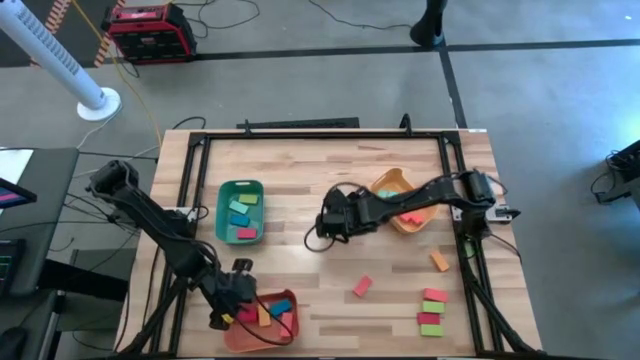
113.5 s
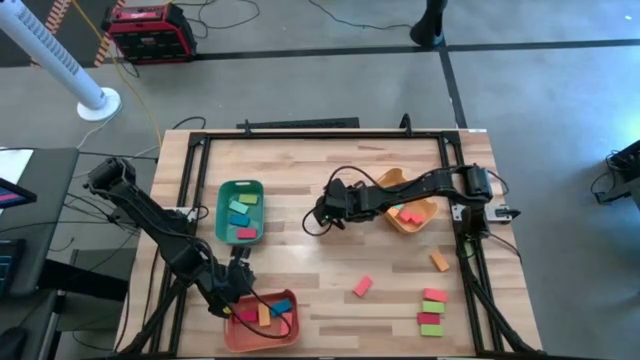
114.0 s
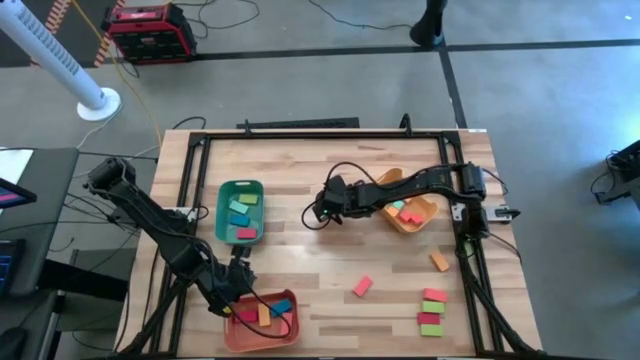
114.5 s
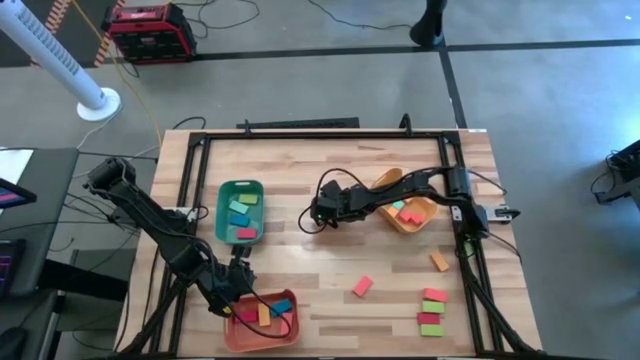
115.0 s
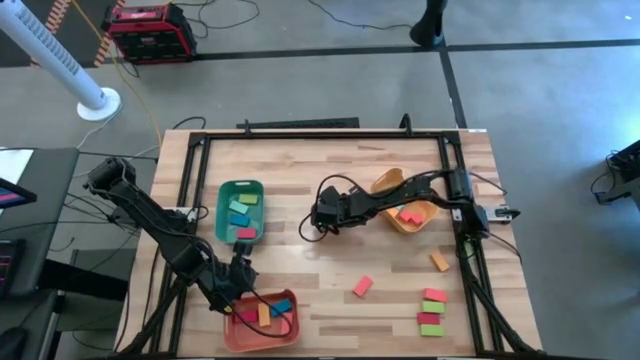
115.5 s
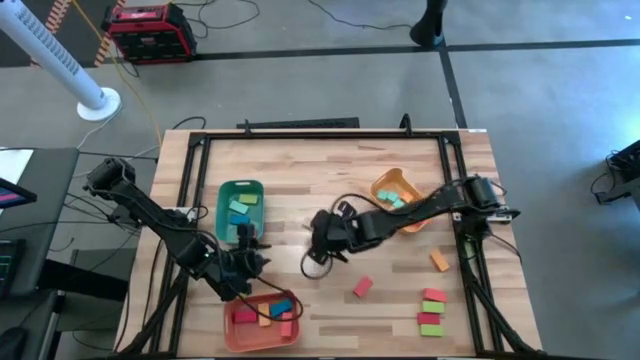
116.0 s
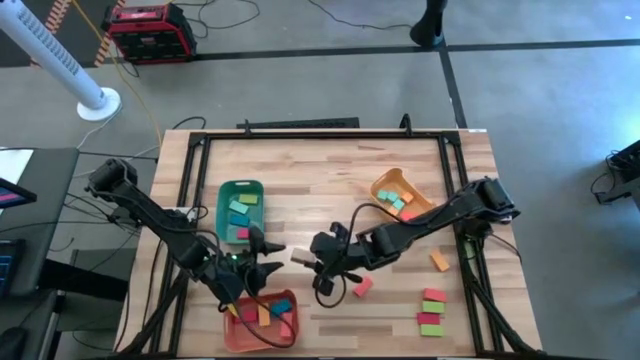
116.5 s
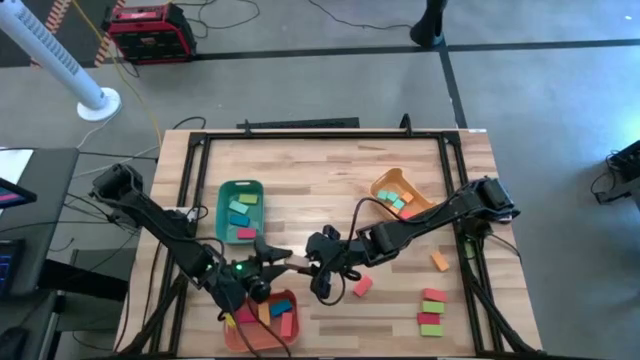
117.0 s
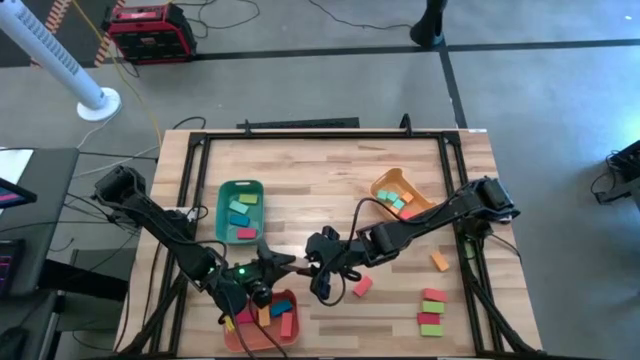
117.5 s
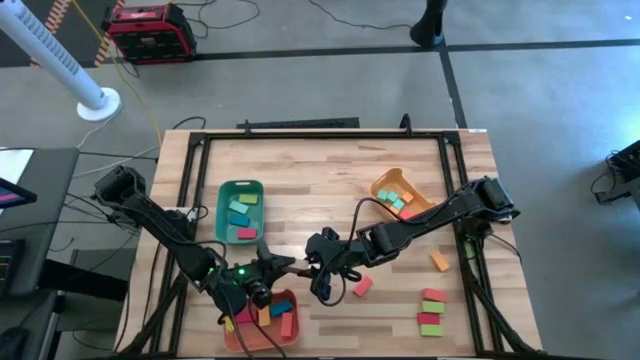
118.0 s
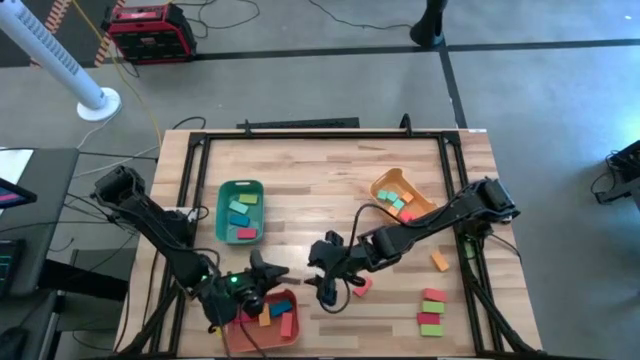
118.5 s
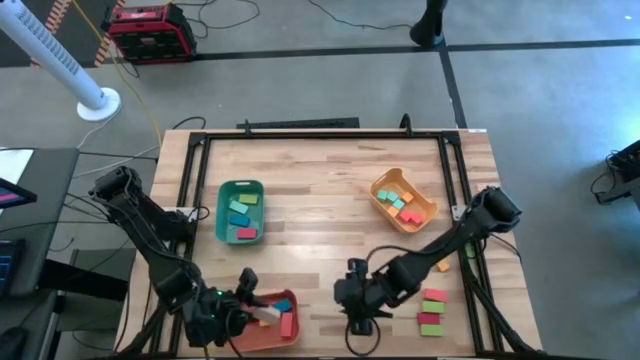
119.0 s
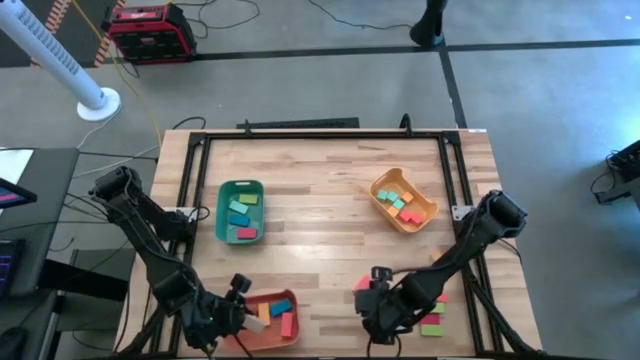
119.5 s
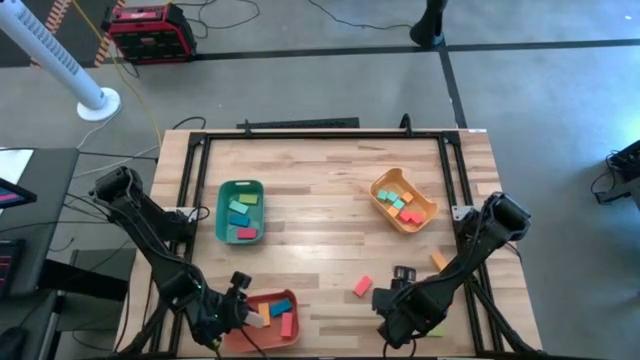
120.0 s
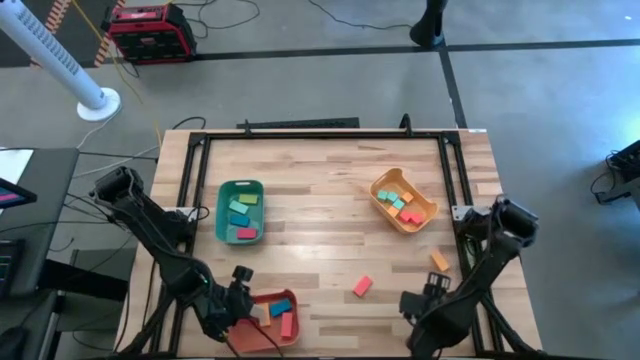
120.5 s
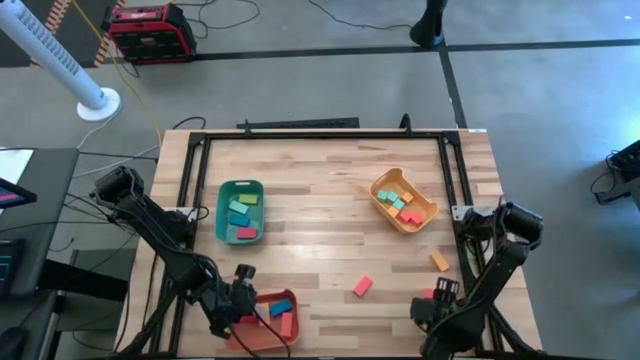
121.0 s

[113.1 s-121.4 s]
Task: Sort blocks by size
Put the thick brown rectangular block into the orange bin

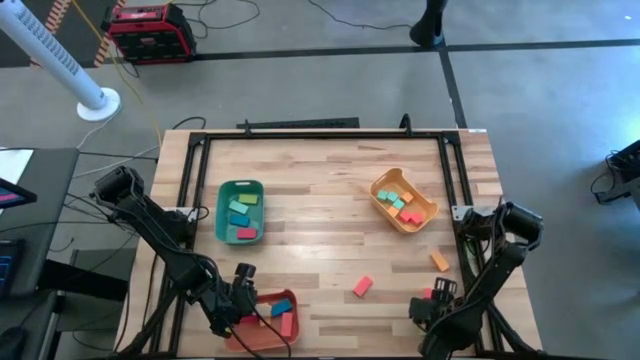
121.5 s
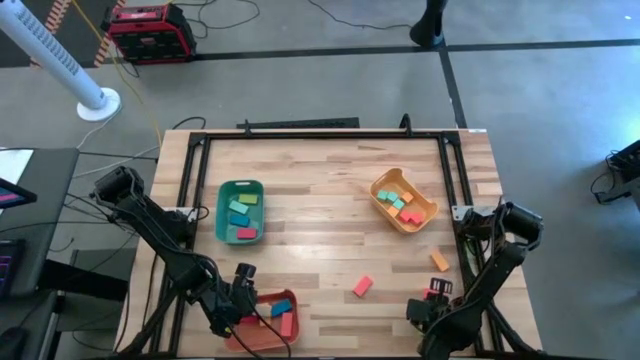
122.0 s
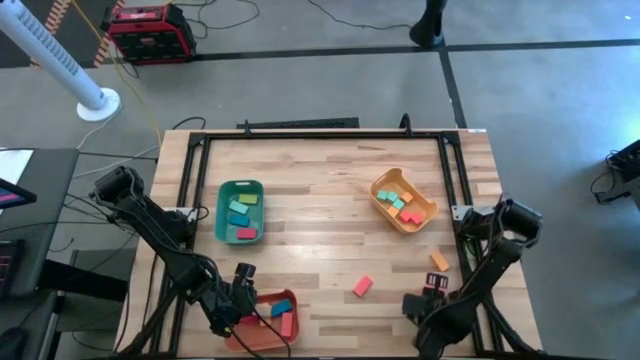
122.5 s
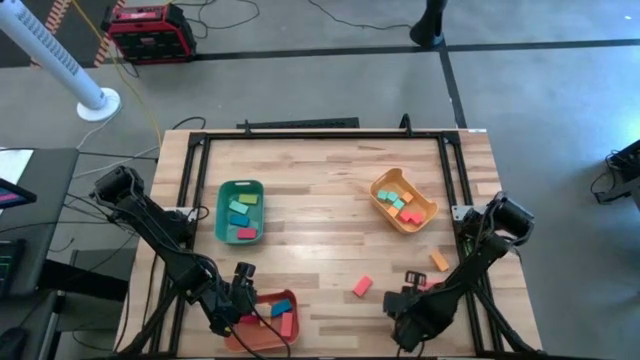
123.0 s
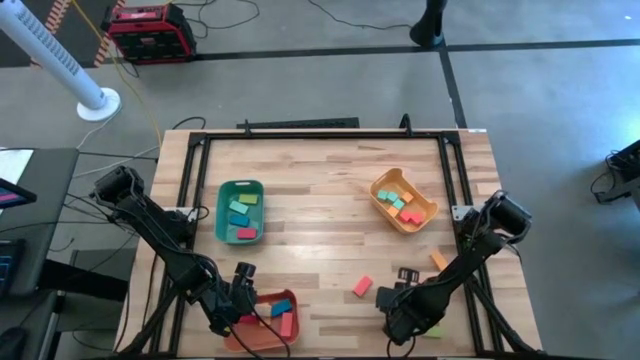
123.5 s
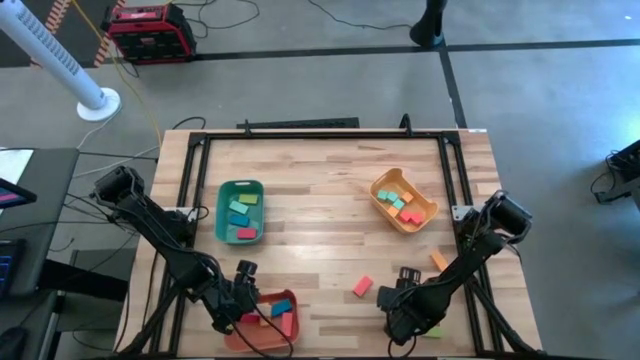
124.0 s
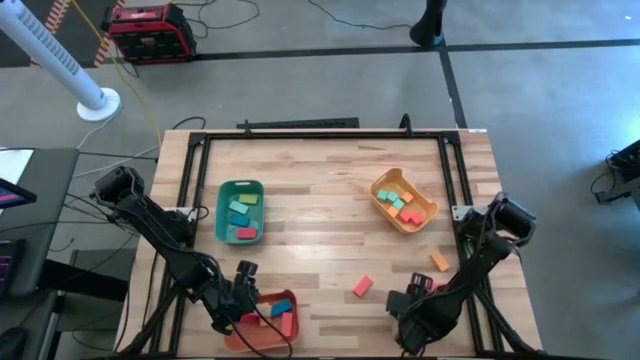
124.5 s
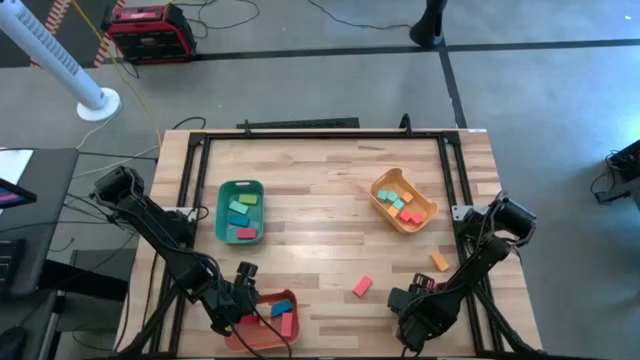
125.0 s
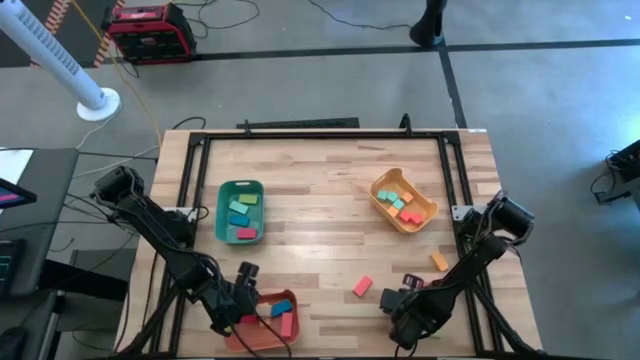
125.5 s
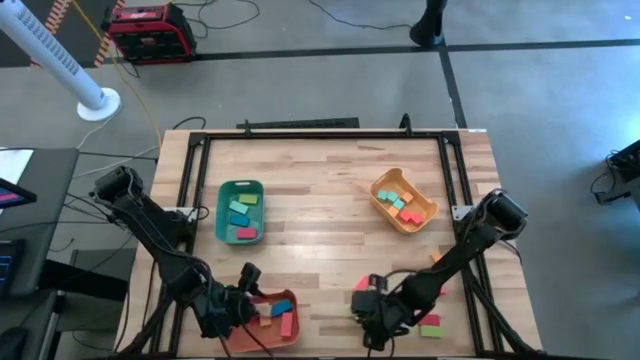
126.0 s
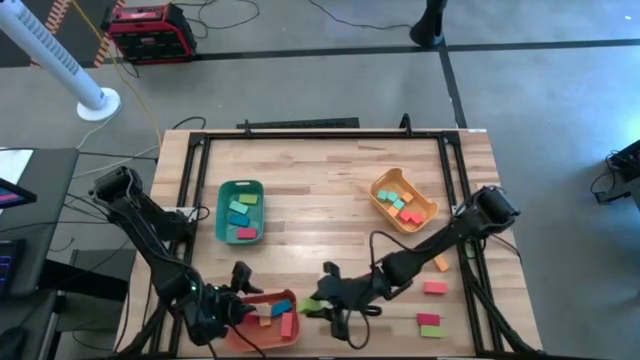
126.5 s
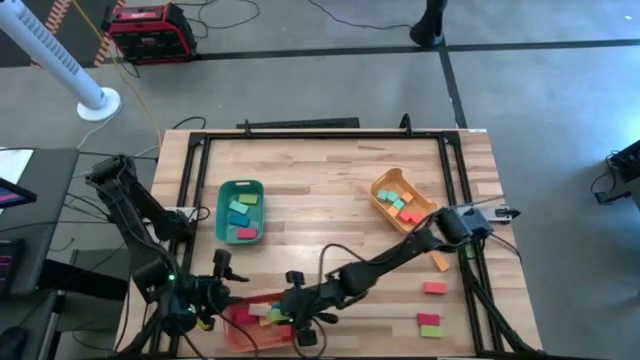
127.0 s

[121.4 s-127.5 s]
Put the thick light green rectangular block into the orange bin

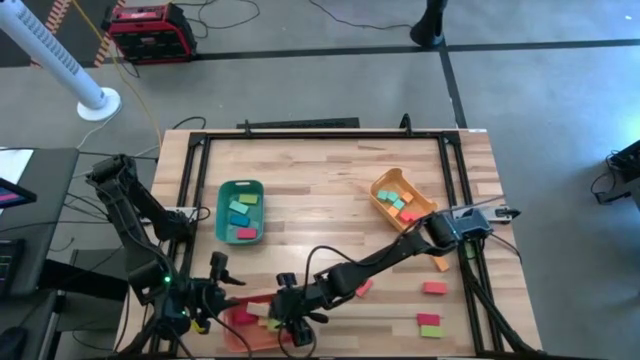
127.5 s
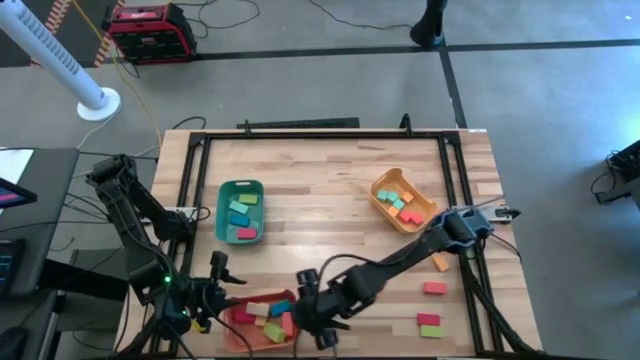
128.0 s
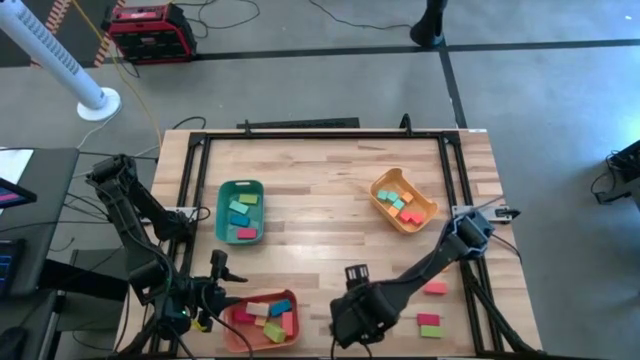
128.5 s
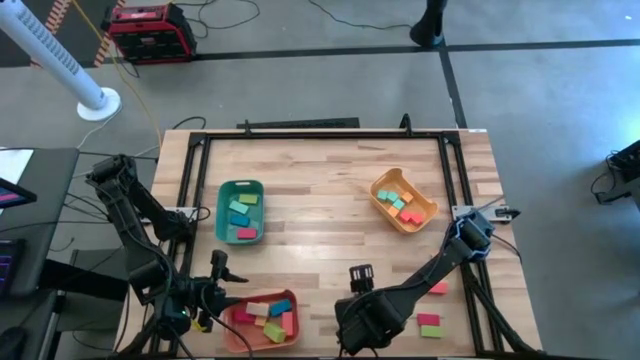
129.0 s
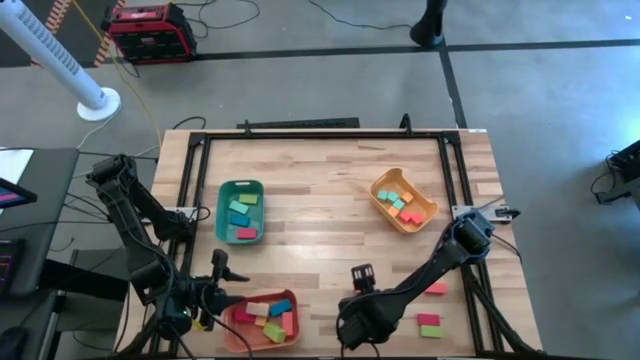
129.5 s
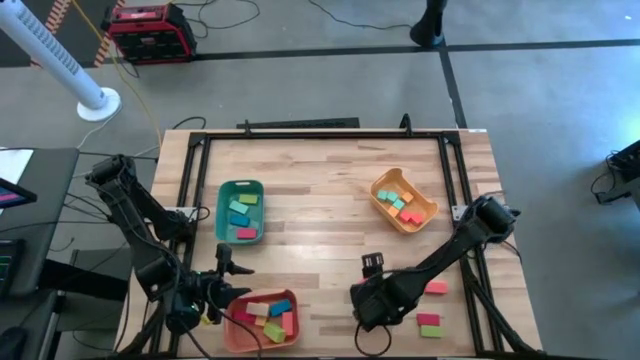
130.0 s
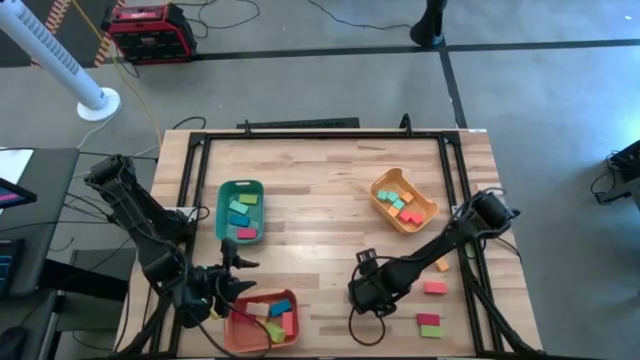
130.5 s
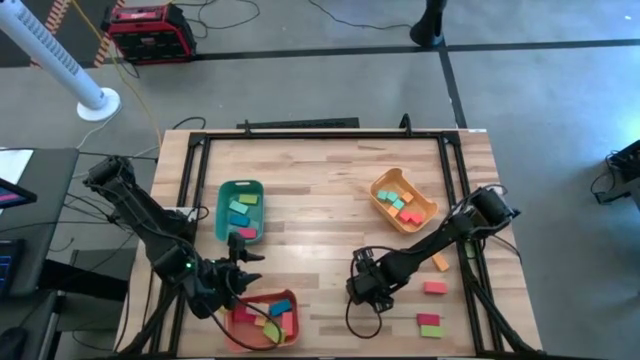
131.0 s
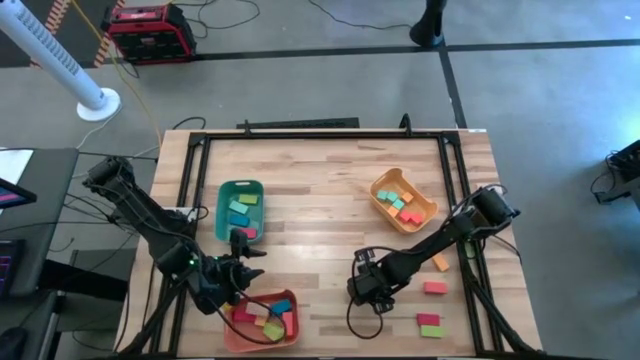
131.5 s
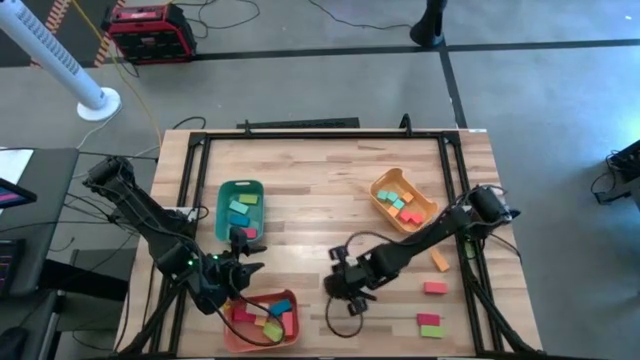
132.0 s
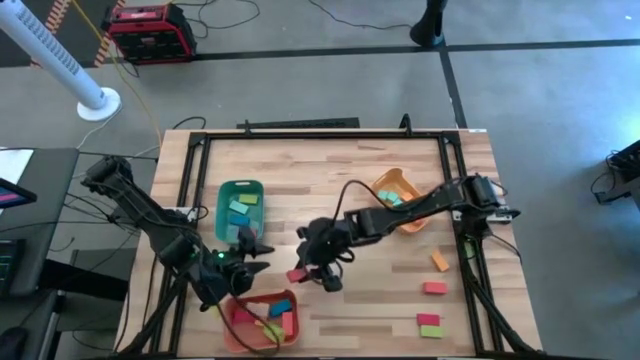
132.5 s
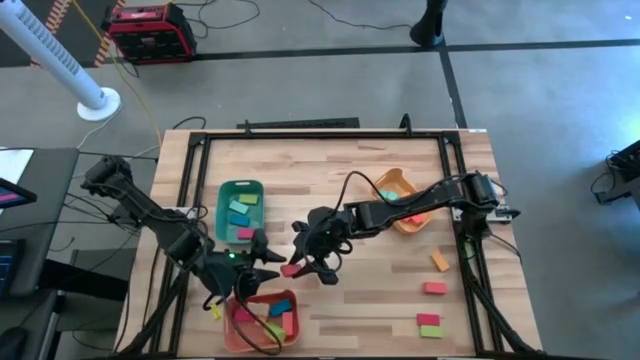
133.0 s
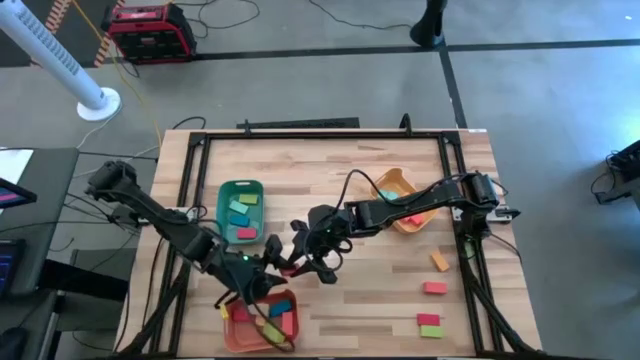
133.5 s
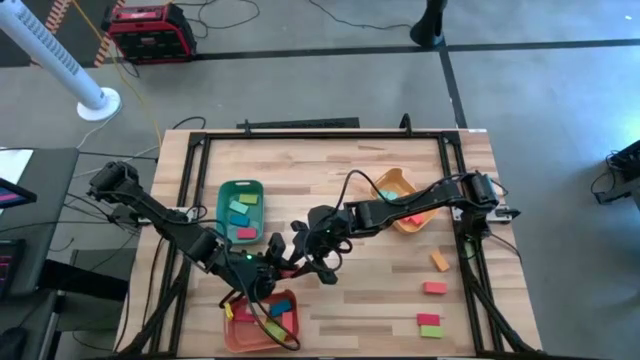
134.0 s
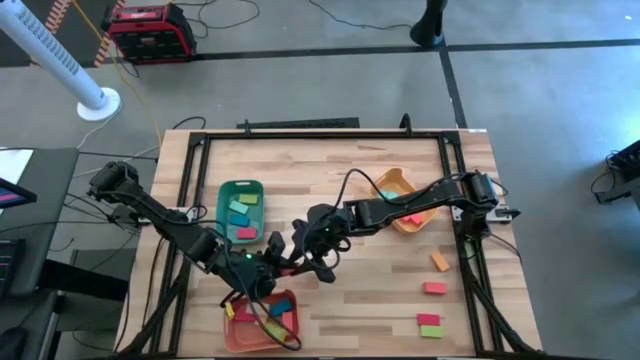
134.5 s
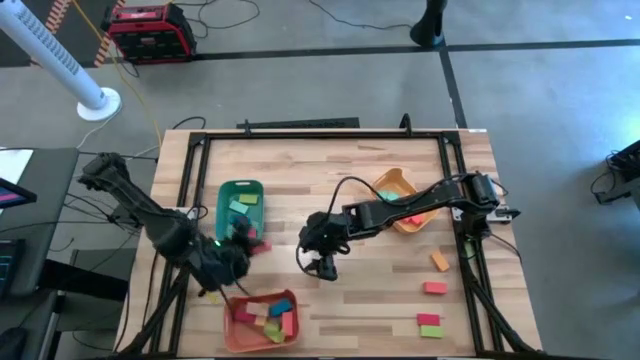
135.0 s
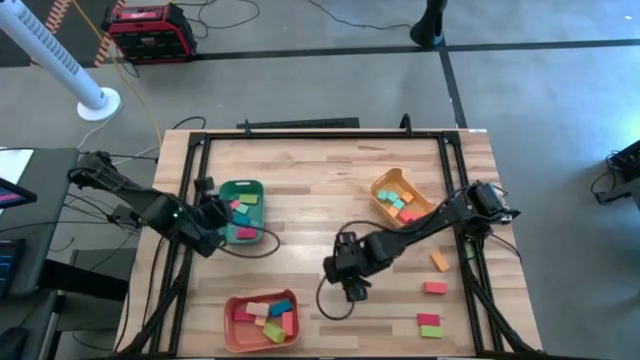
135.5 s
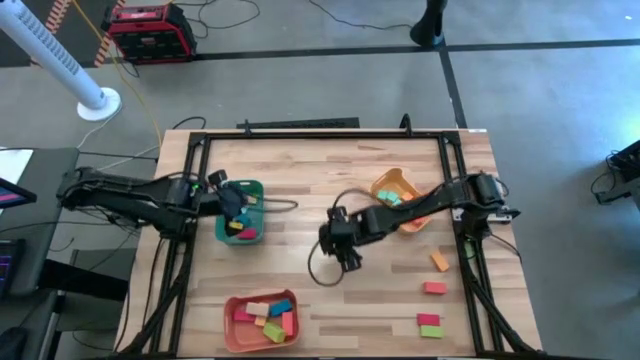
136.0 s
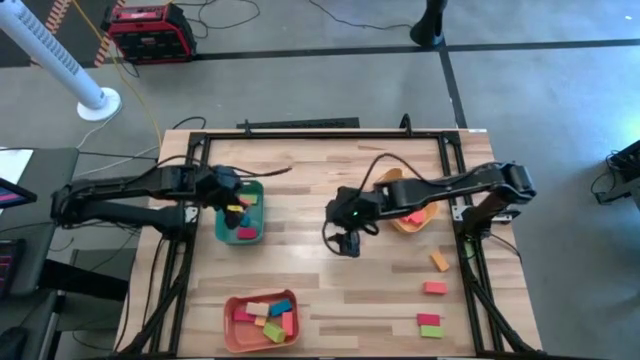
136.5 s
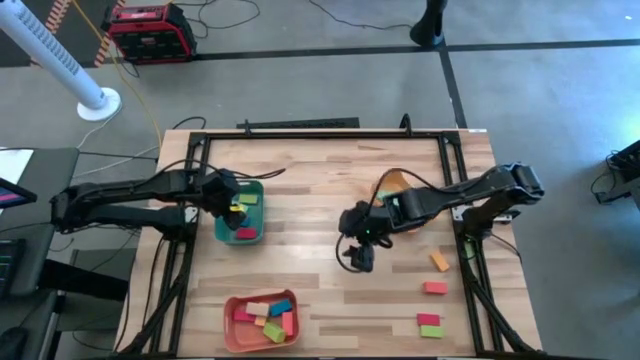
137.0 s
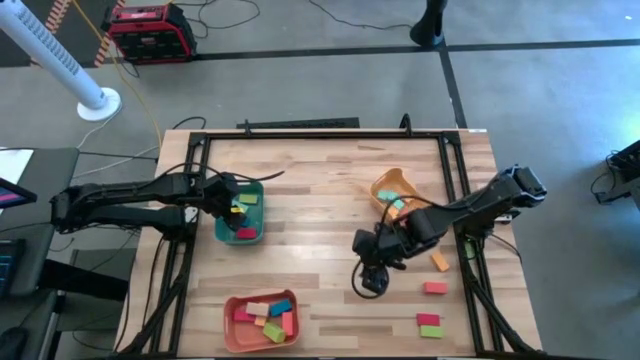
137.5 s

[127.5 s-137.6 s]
Put the thin orange rectangular block into the green bin
